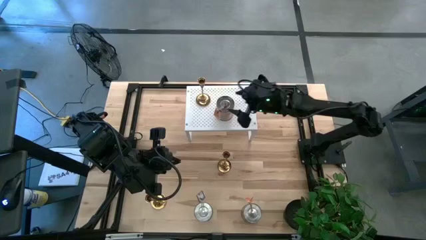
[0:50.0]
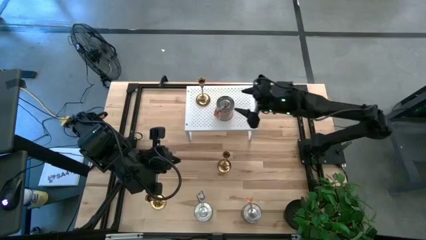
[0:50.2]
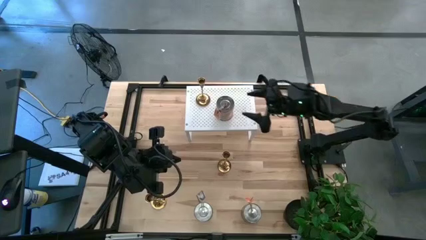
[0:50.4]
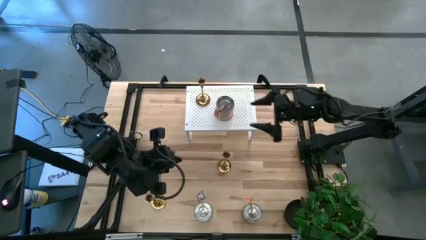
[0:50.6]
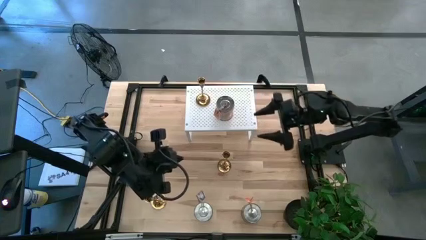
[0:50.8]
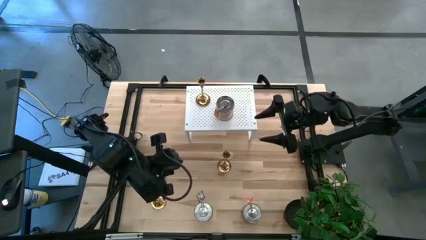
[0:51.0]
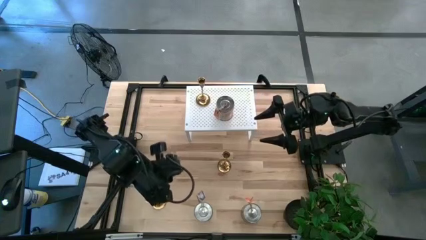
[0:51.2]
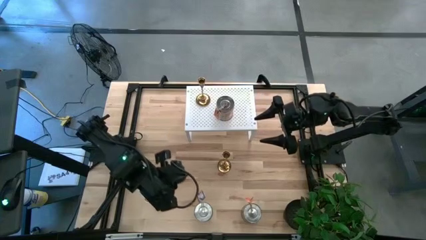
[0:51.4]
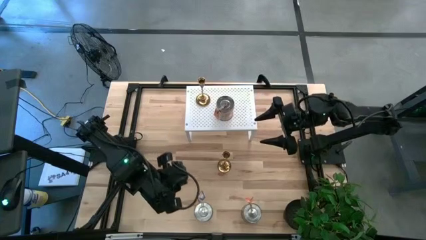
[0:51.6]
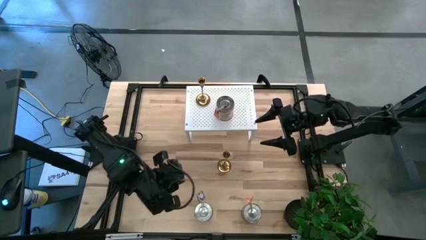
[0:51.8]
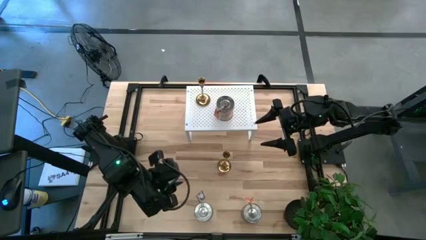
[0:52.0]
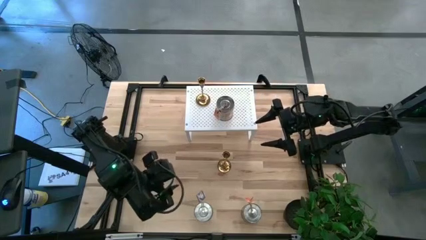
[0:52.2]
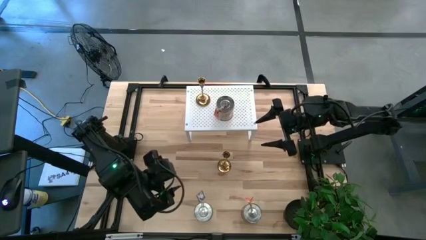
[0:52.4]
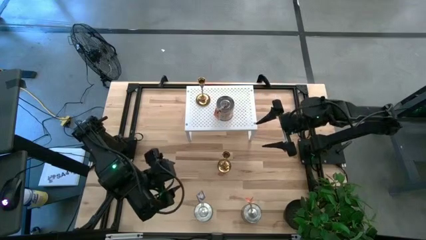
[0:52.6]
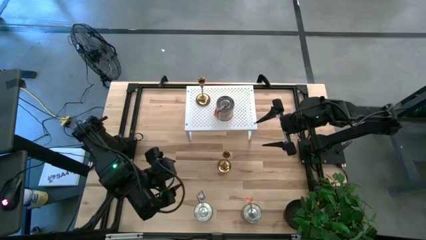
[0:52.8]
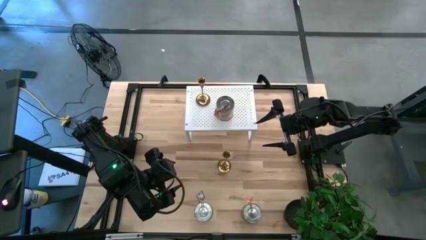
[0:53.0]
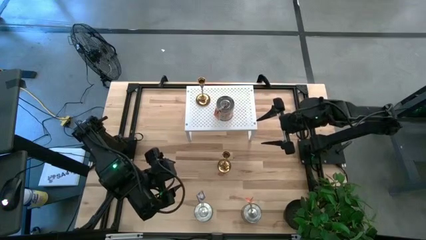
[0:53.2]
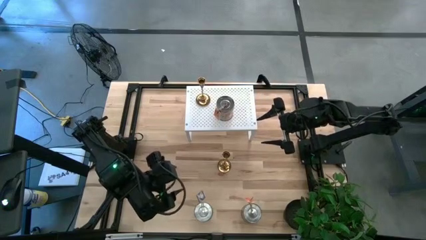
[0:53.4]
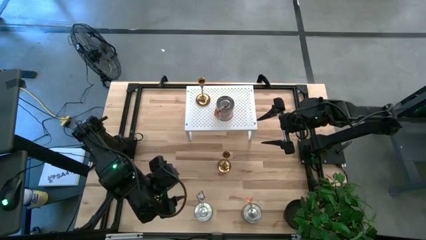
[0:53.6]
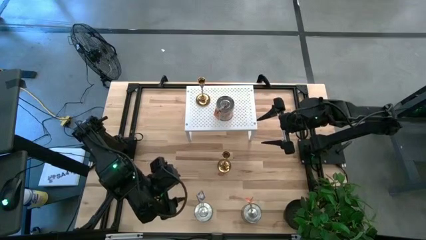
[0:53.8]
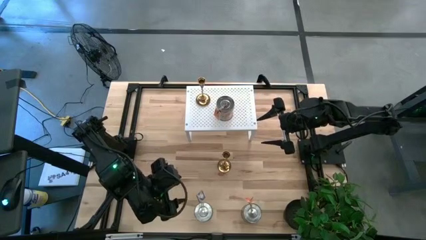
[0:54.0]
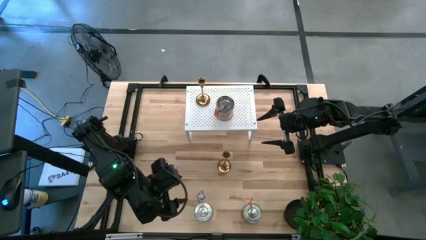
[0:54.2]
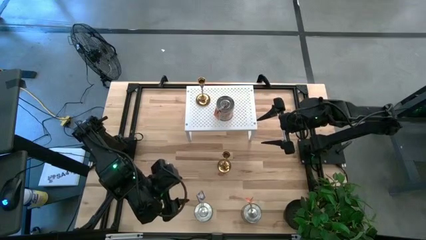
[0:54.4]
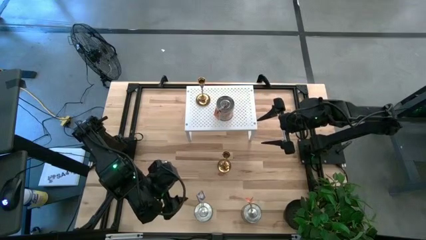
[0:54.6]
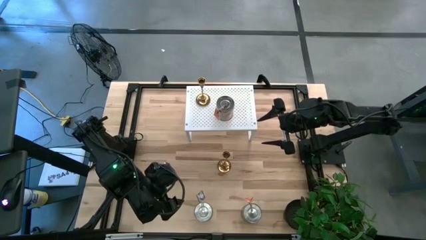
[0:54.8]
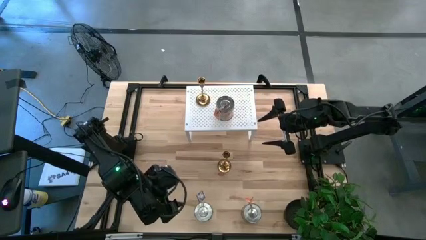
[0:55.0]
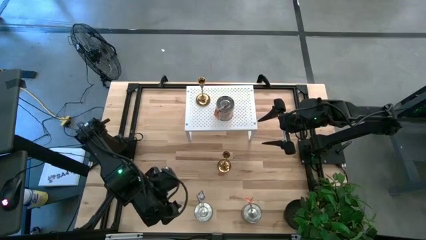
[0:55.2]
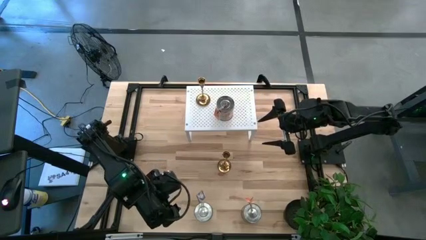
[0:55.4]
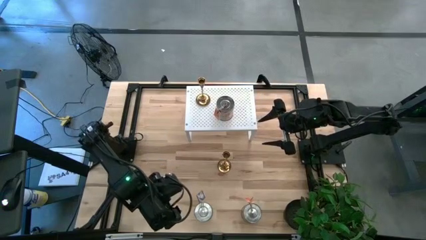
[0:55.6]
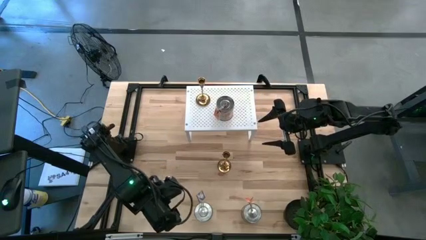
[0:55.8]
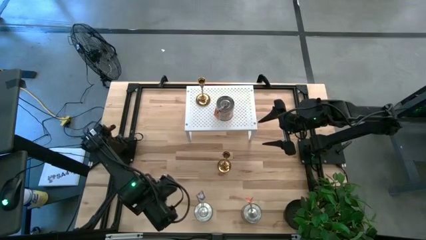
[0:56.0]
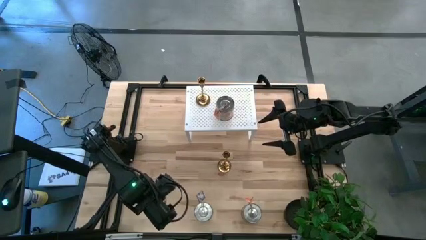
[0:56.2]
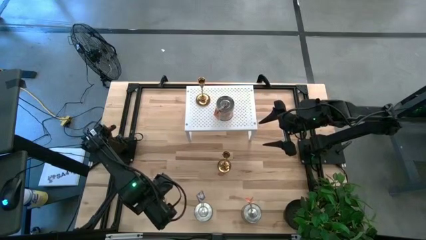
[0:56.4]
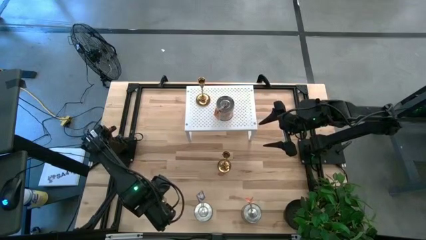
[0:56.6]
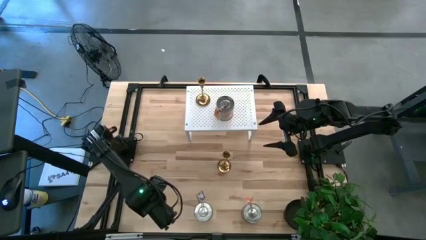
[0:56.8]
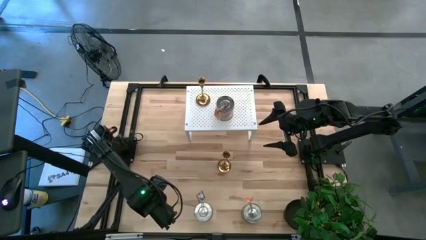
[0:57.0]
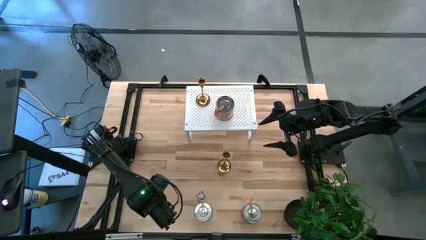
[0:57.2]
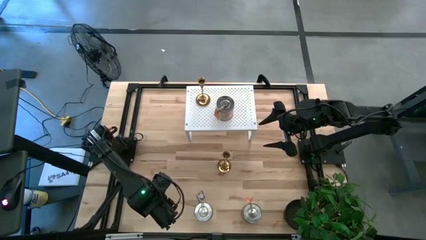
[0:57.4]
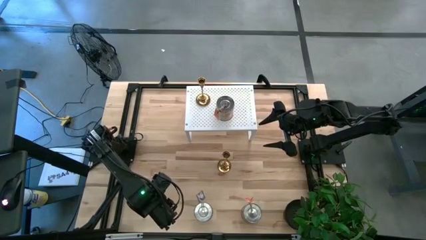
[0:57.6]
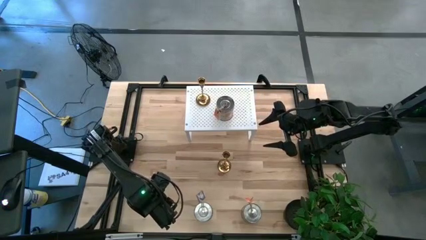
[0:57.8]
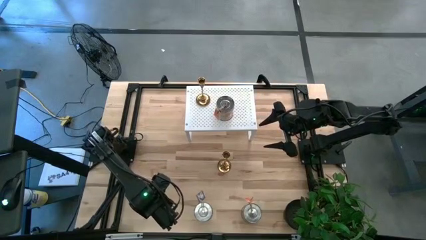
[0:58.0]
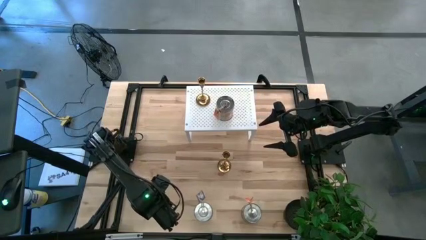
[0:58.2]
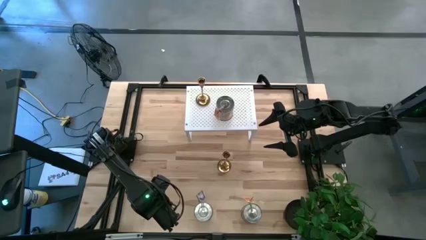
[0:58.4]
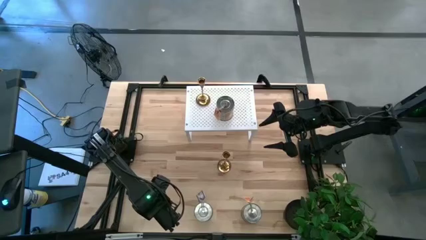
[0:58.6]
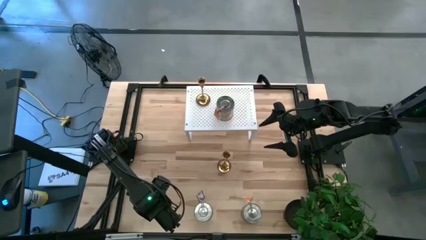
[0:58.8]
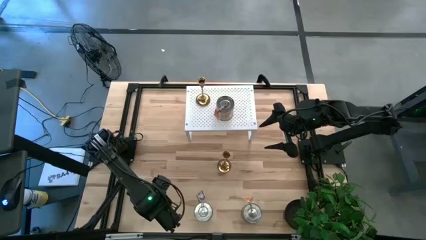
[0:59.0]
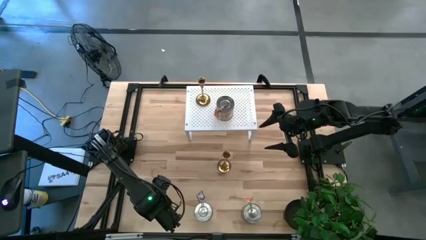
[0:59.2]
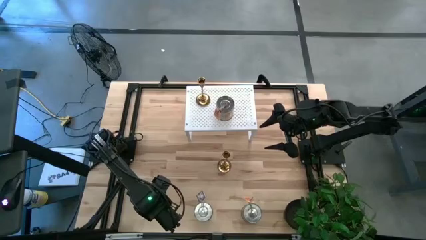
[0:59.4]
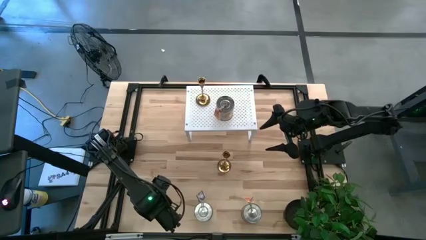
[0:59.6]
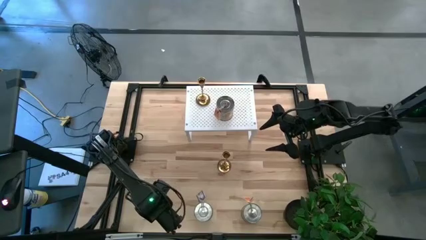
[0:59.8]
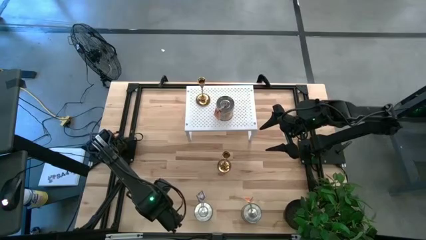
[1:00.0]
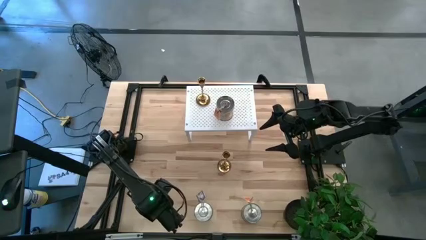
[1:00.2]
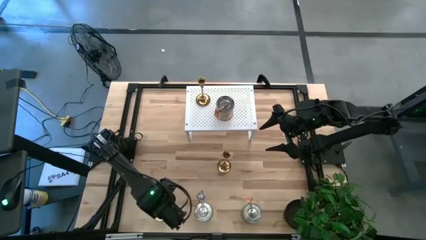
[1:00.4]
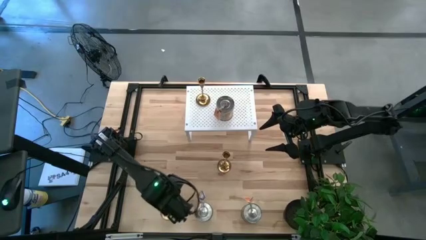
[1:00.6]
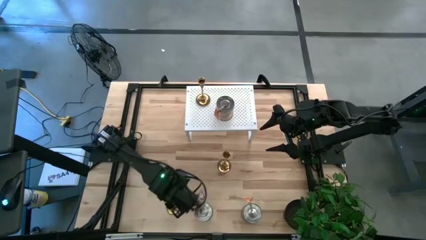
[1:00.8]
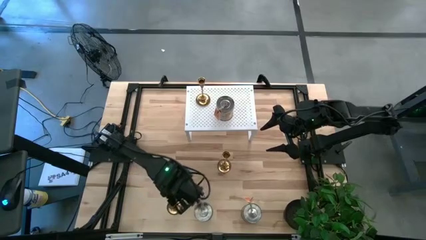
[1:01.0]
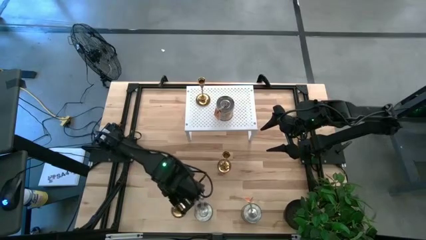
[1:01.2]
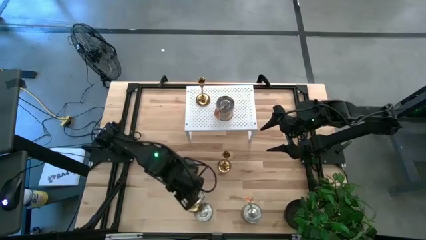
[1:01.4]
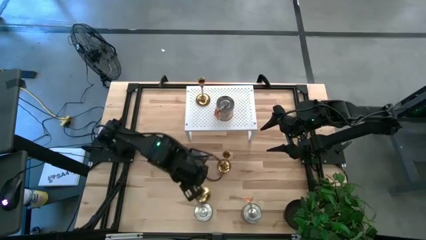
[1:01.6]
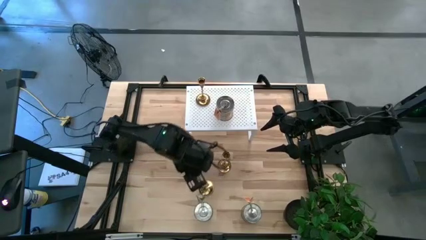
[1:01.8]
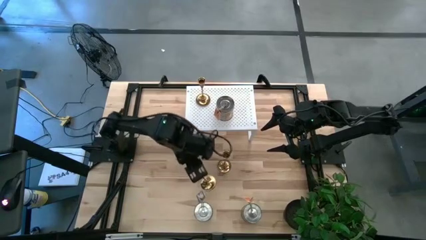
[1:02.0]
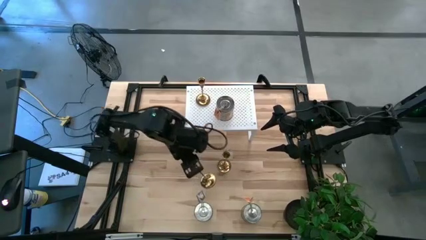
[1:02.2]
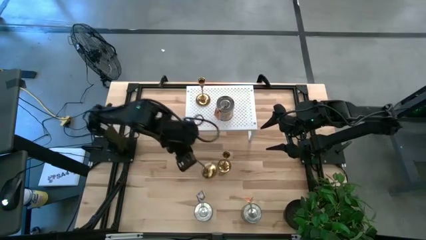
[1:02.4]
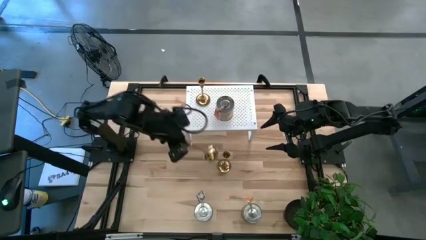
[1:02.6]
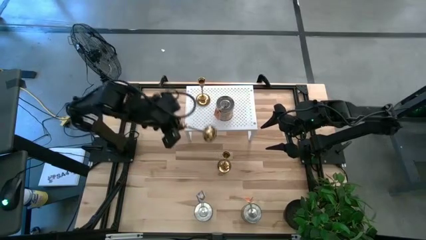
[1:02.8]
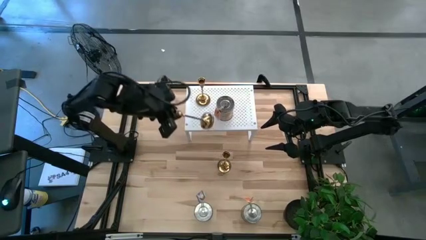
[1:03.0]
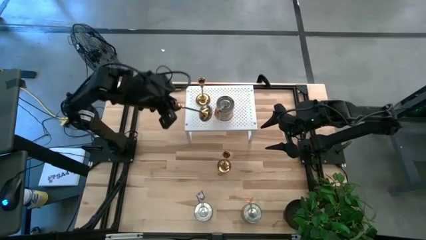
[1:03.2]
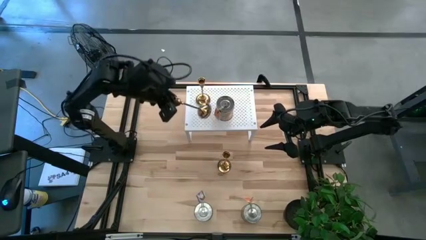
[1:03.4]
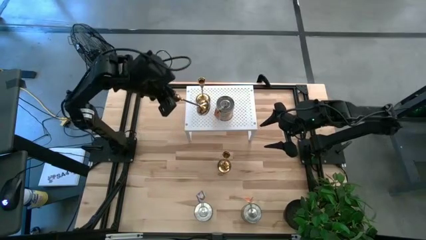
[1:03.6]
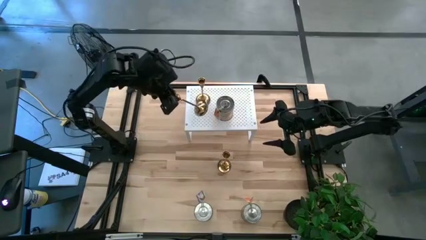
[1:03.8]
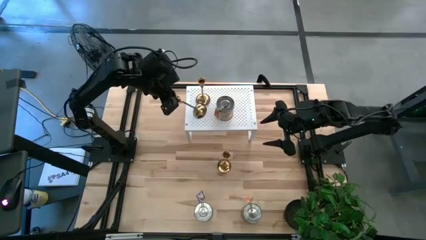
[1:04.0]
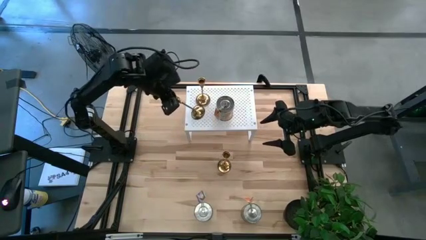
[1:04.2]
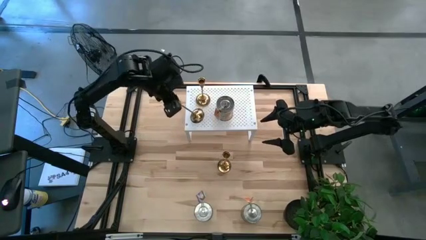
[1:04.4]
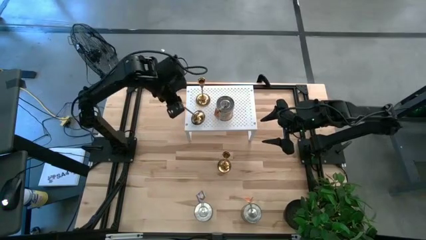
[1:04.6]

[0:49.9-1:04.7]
Task: Pick & Place candle stick holders
Put the bottom gold candle holder on the shelf aligned with the other gold candle holder
